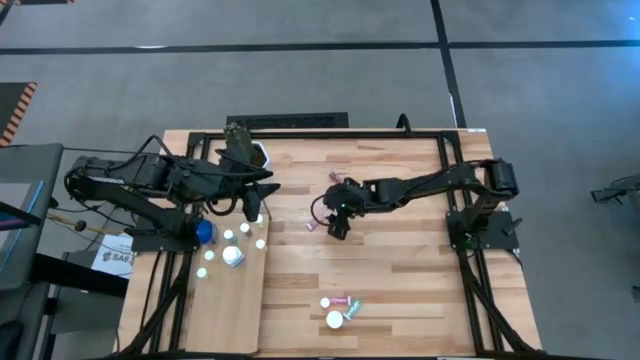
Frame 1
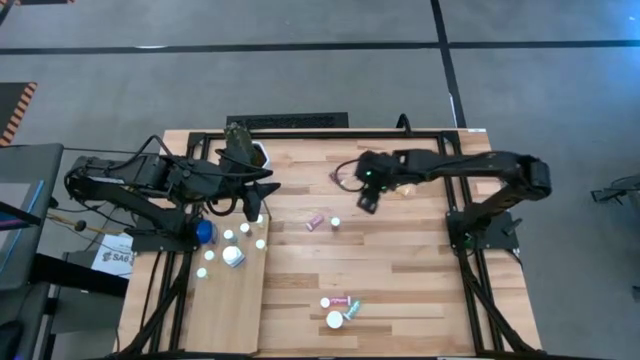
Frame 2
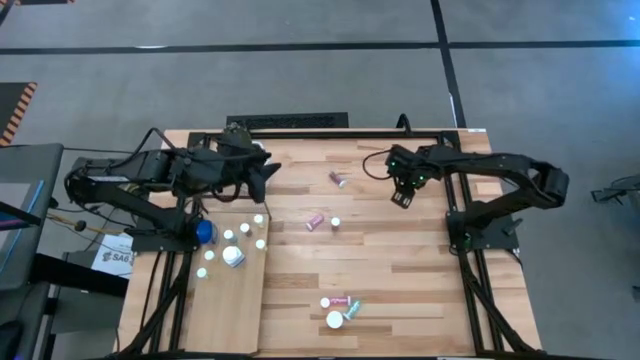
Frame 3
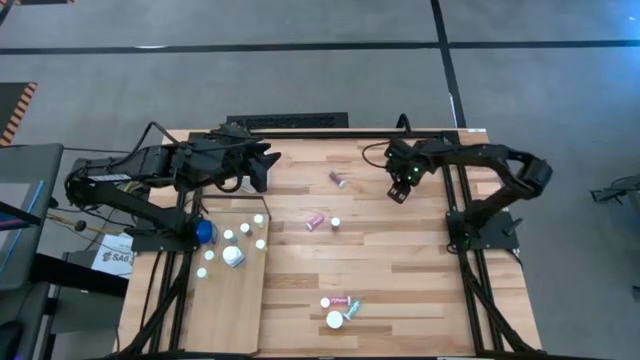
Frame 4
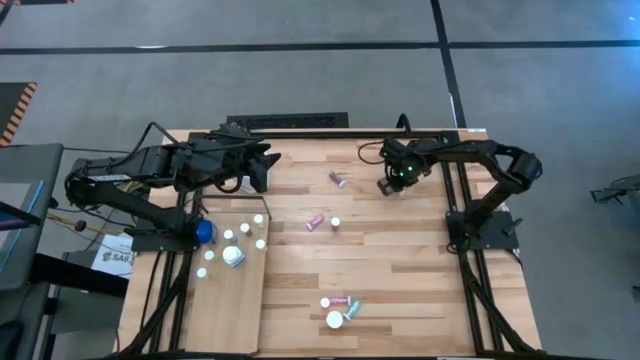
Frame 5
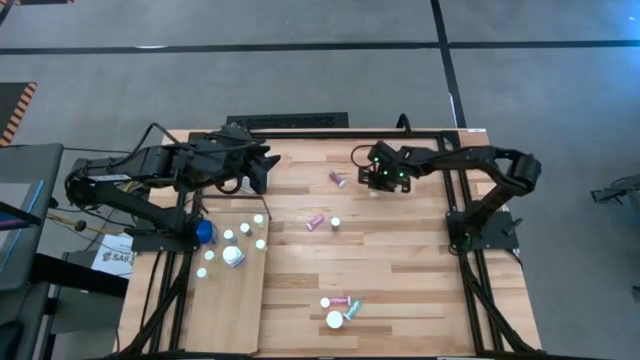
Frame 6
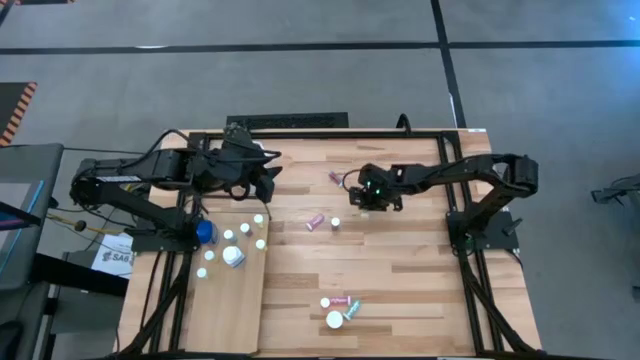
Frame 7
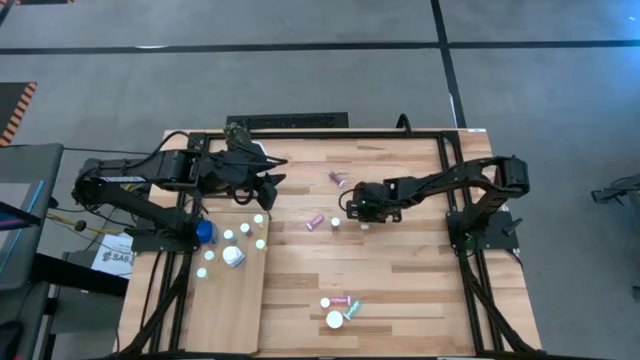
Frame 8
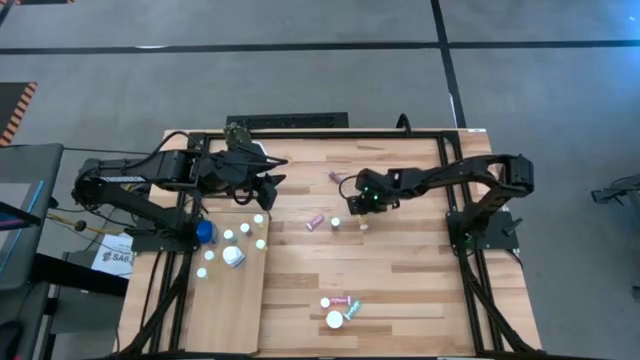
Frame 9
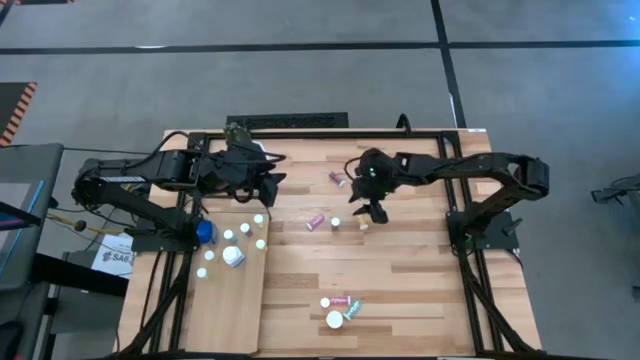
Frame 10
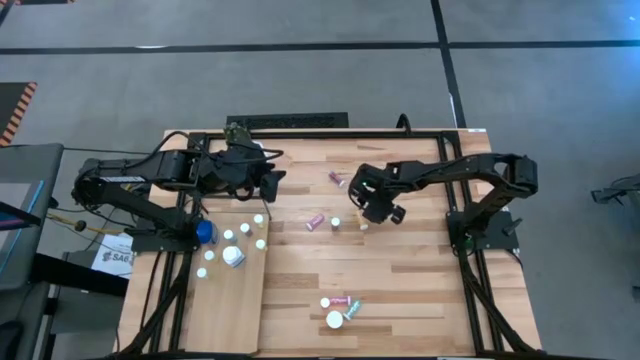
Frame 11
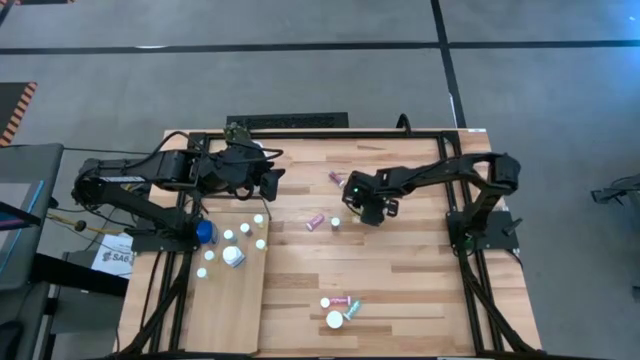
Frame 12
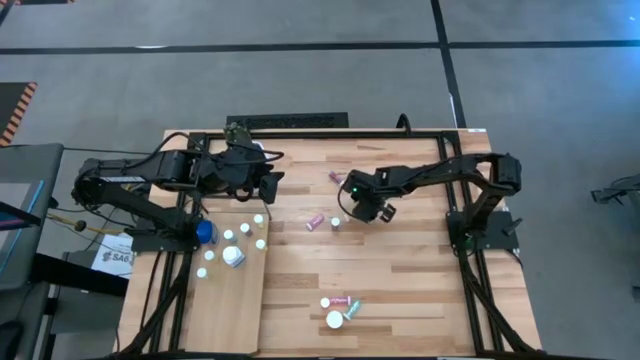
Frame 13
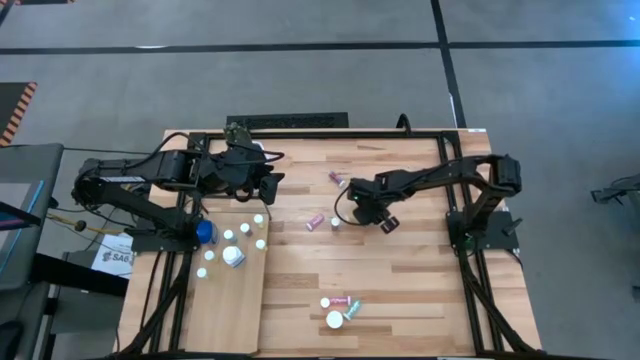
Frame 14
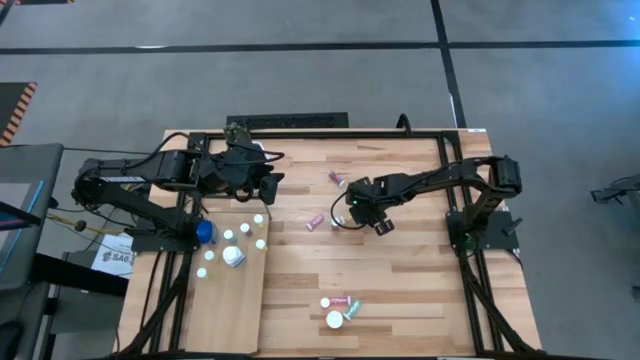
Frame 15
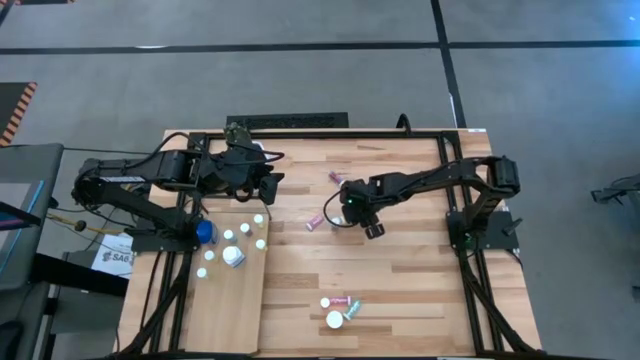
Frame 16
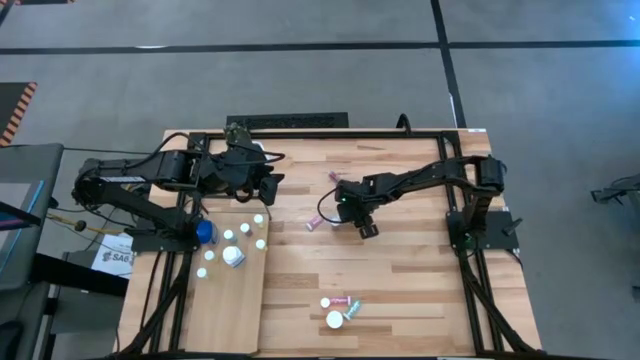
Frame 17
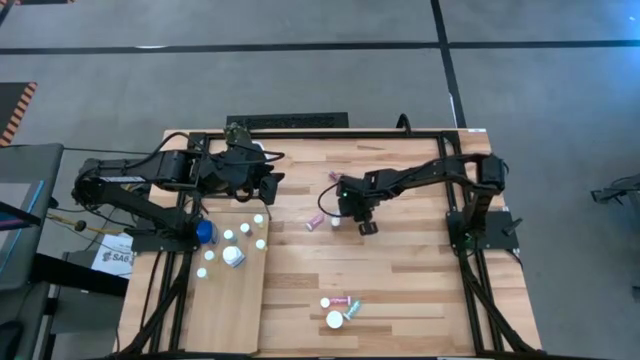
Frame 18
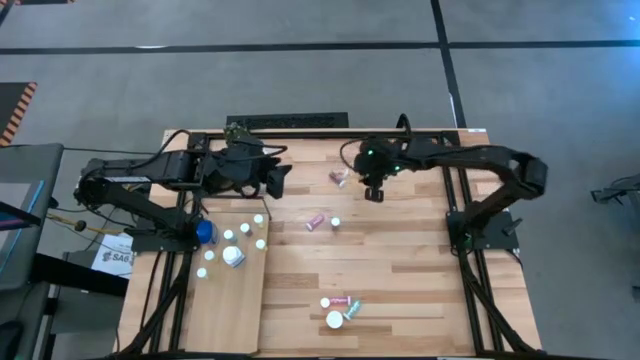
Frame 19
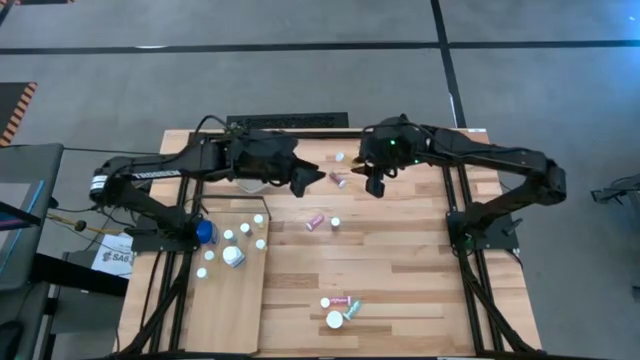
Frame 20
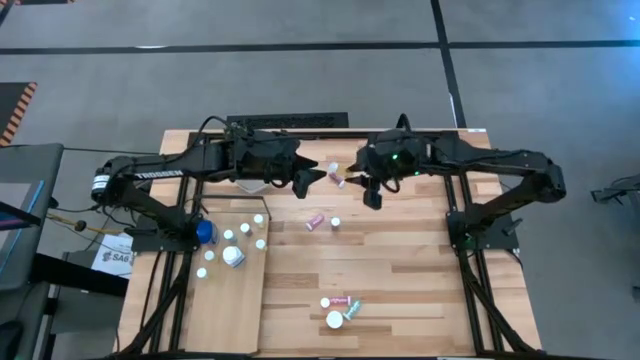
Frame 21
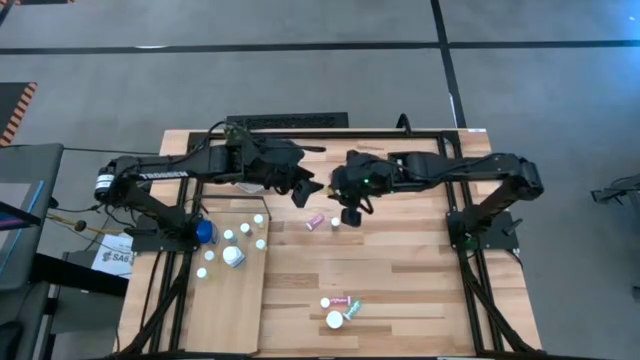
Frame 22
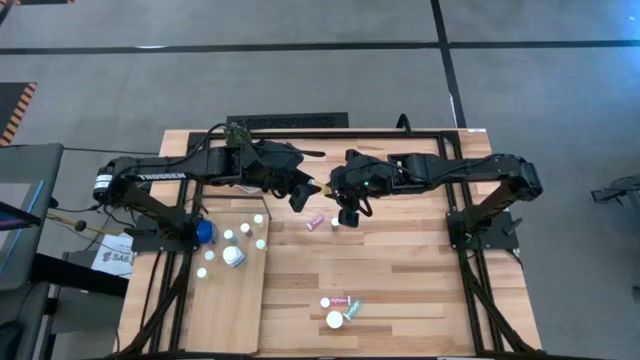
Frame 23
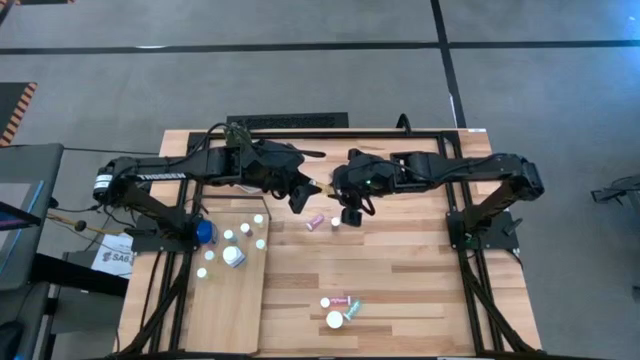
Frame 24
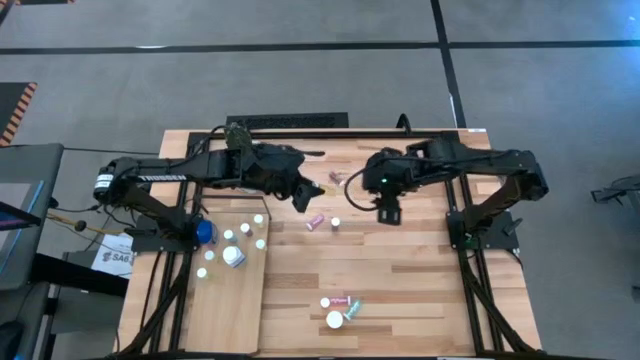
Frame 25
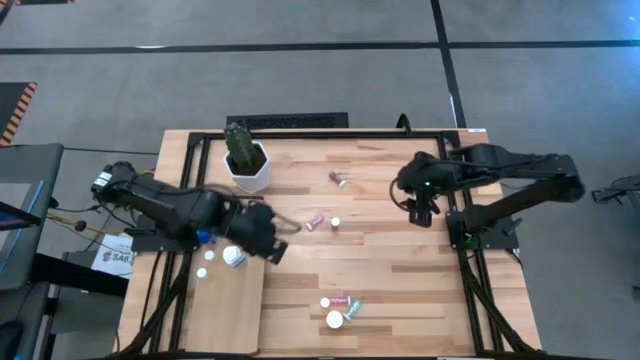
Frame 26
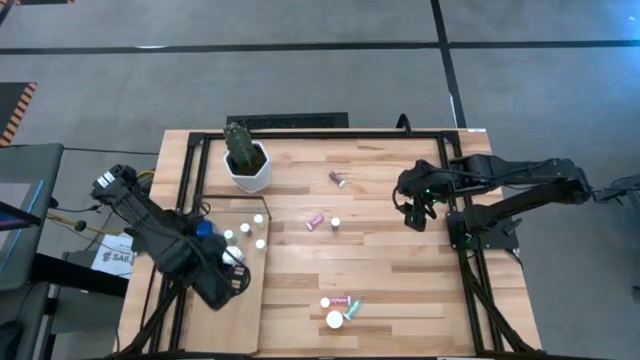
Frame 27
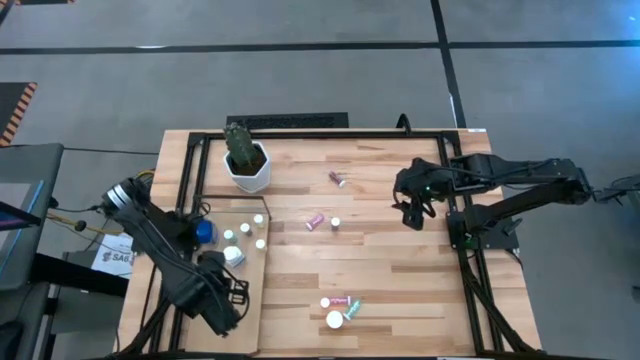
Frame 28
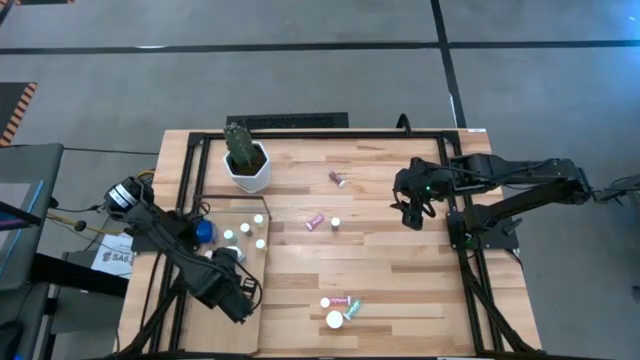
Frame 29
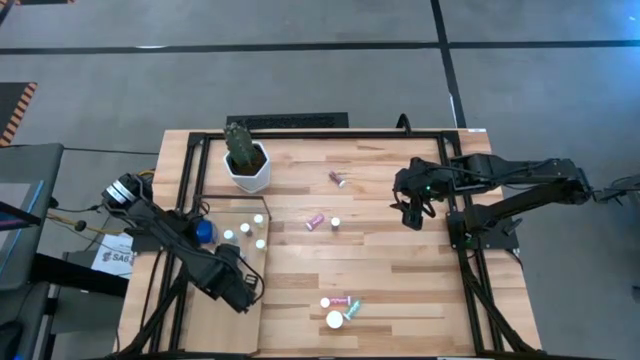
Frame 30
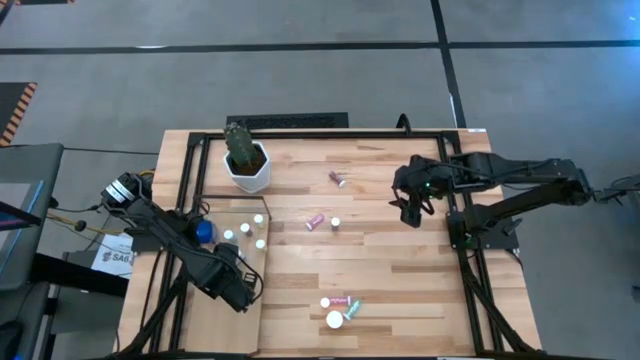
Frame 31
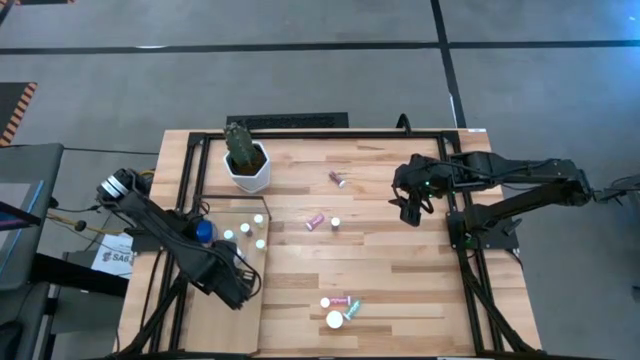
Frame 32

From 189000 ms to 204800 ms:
Task: Pick and place medicine bottles onto shelf by color
Put the yellow pill bottle on the shelf

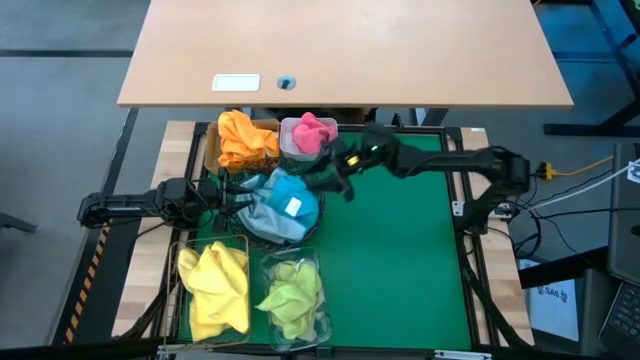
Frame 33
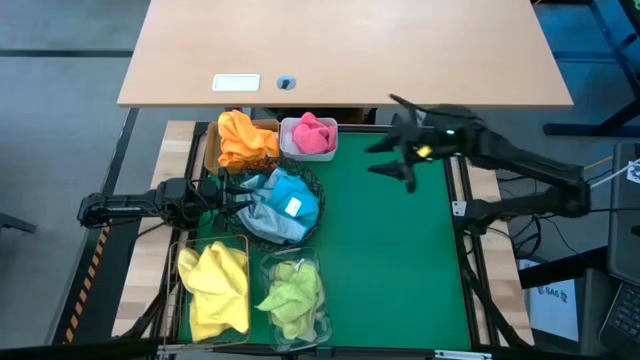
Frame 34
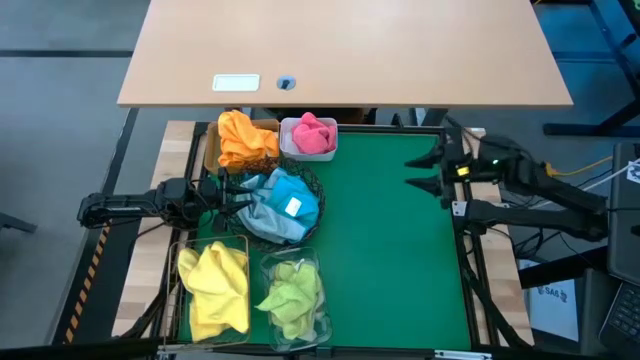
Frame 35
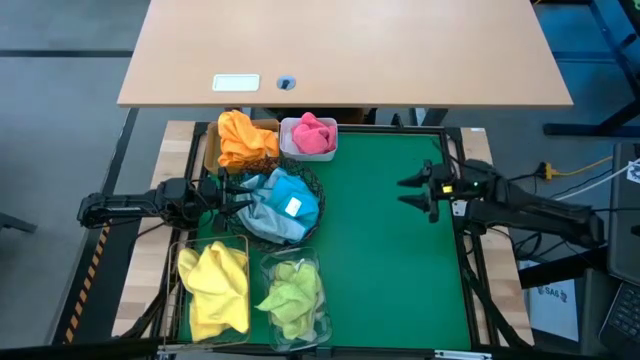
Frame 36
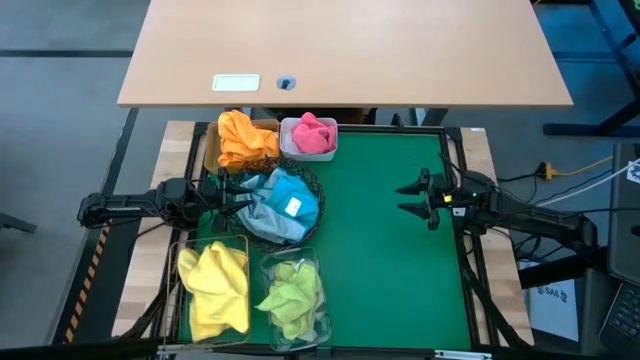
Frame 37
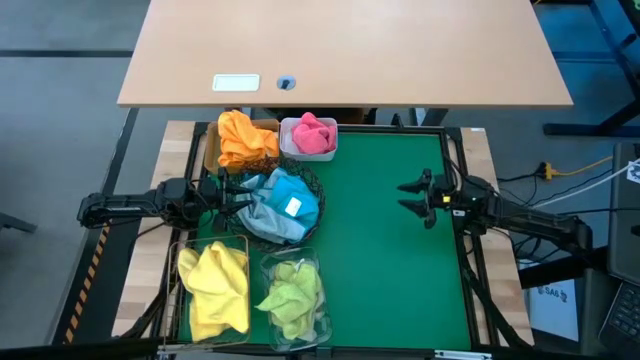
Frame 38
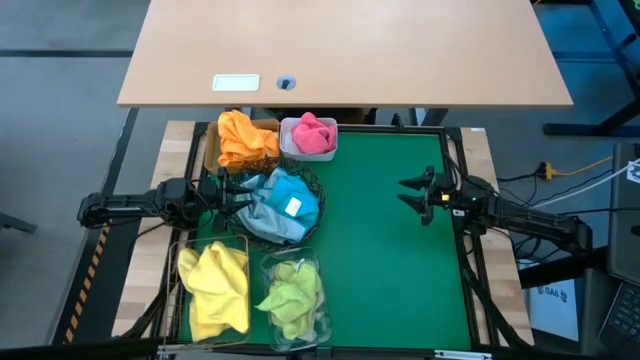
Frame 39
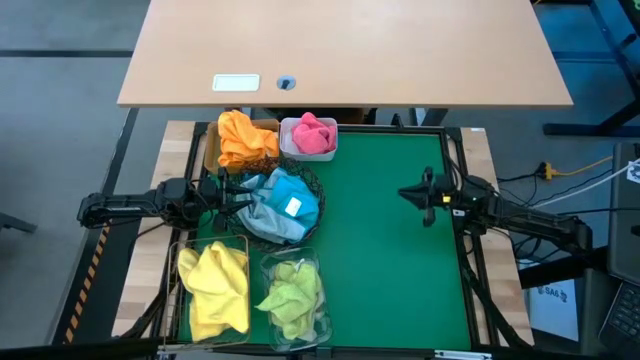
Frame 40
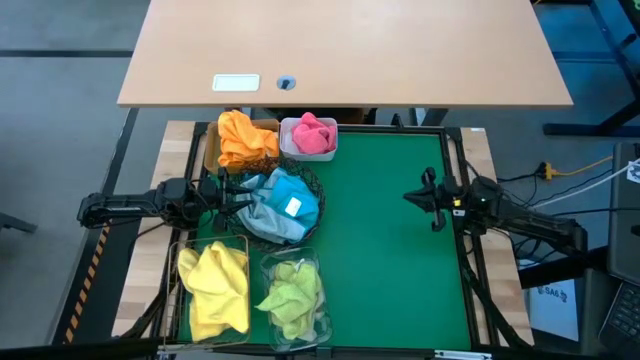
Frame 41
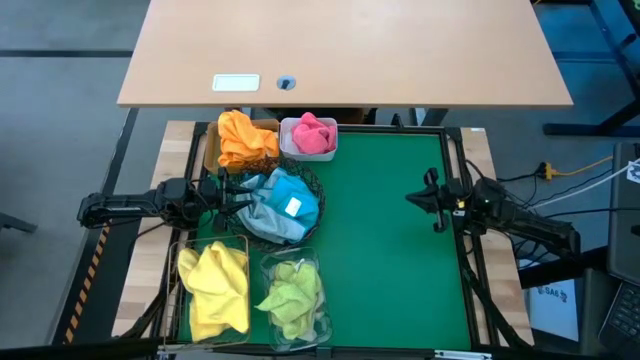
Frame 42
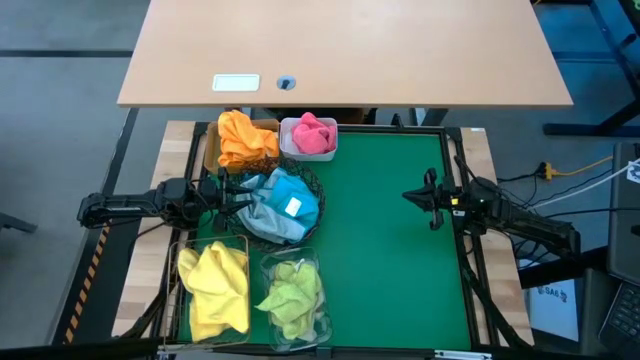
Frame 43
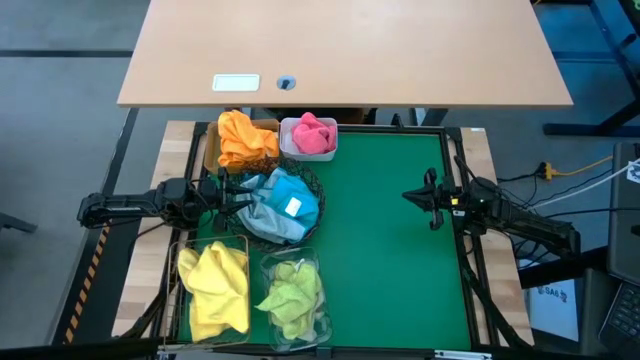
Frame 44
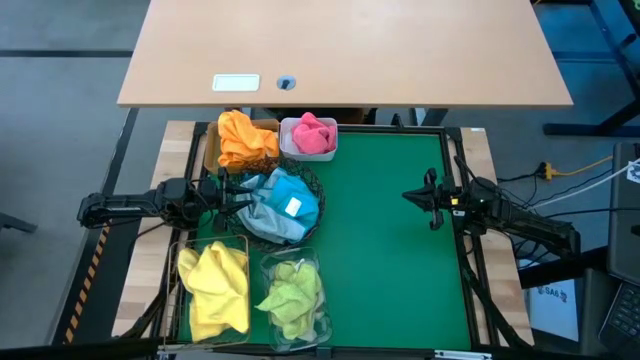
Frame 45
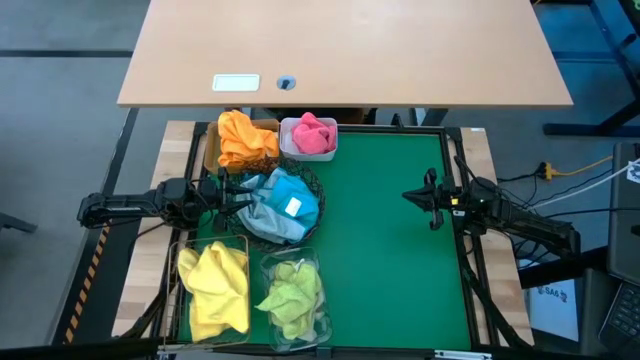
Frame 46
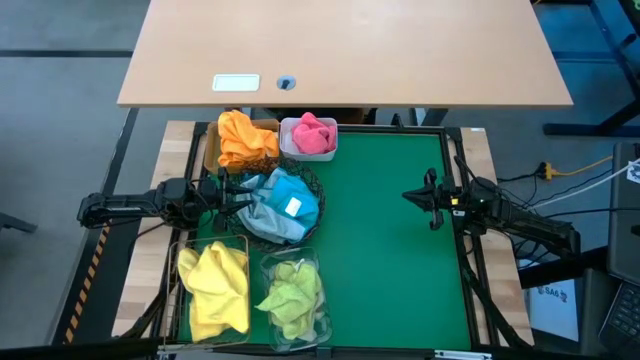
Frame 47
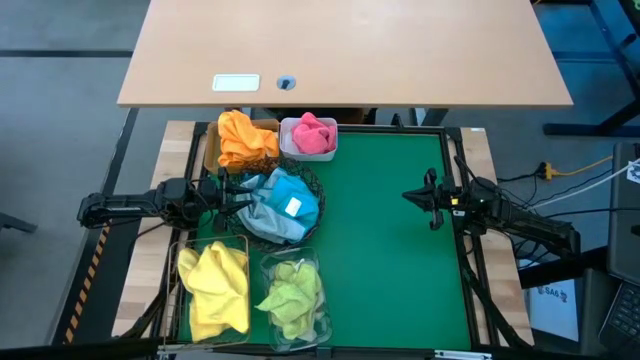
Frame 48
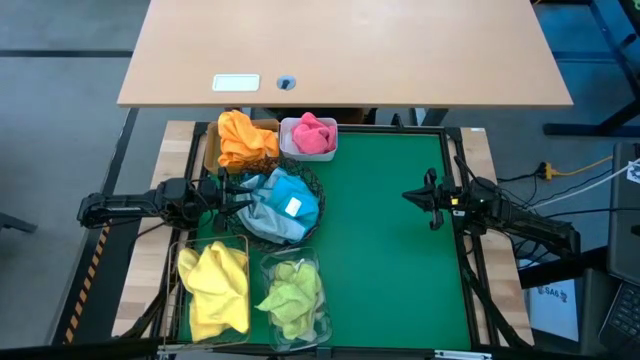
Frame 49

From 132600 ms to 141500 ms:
Task: Sort microfiber towel by color & place in baskets
Return to Home Position
